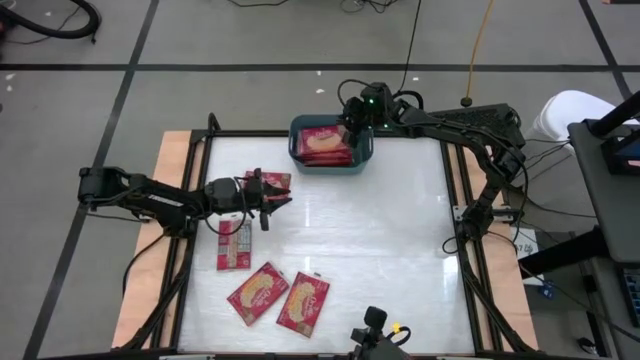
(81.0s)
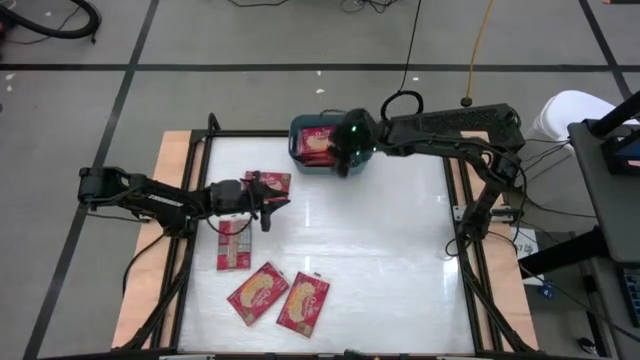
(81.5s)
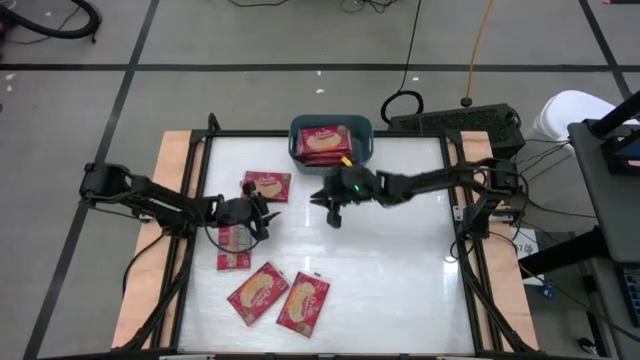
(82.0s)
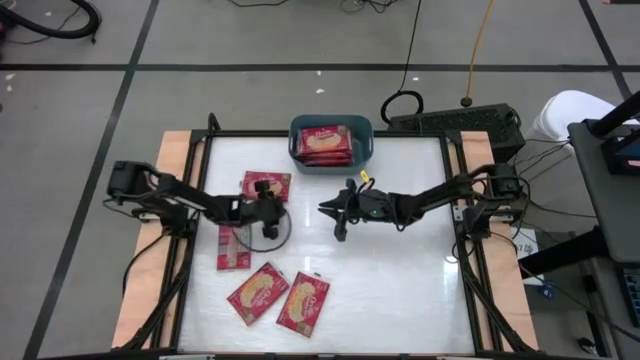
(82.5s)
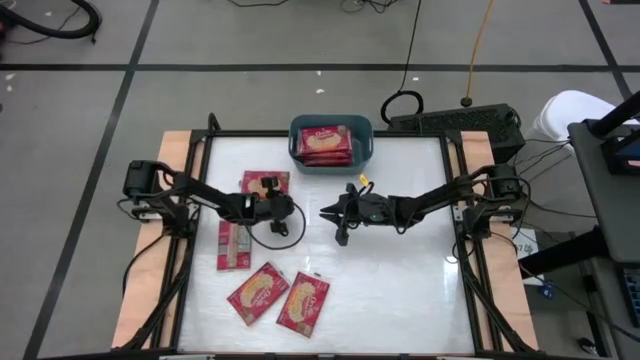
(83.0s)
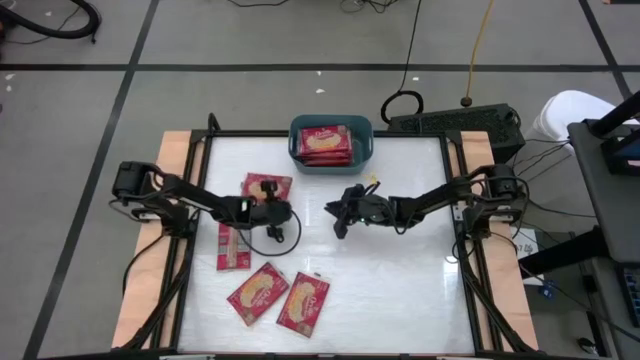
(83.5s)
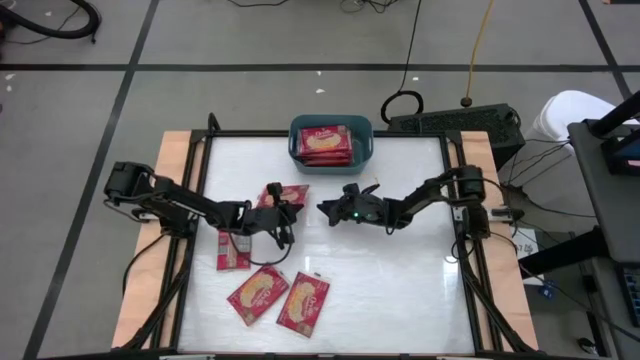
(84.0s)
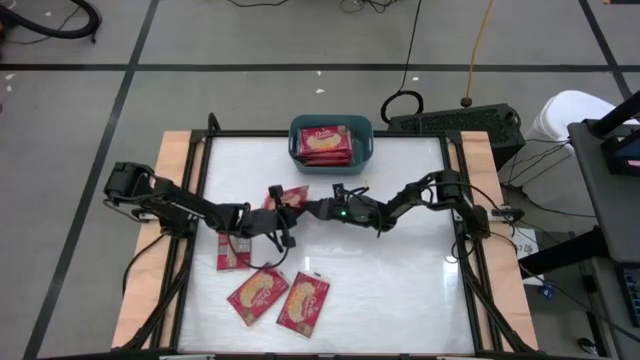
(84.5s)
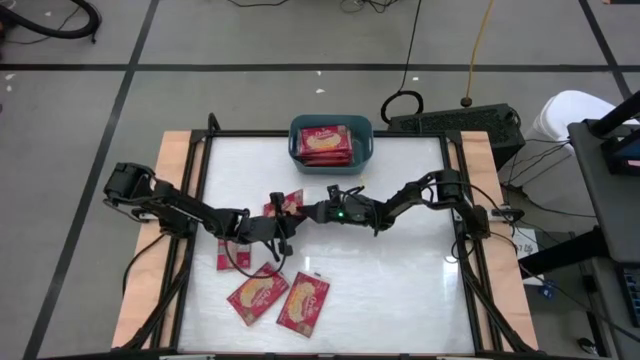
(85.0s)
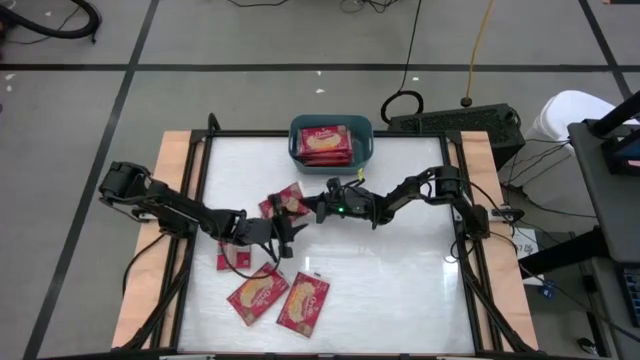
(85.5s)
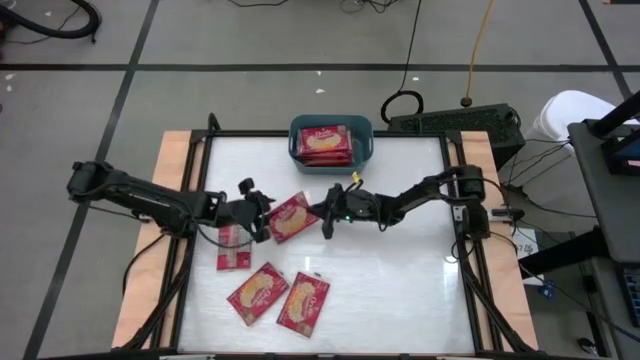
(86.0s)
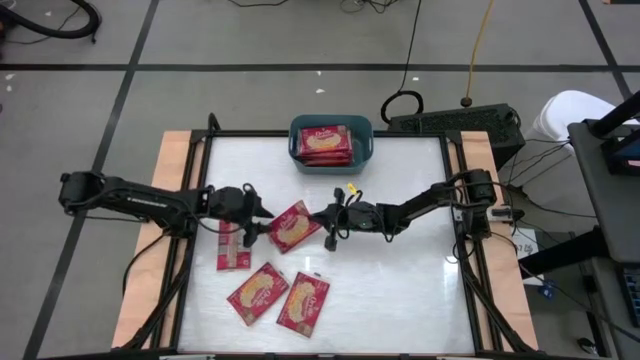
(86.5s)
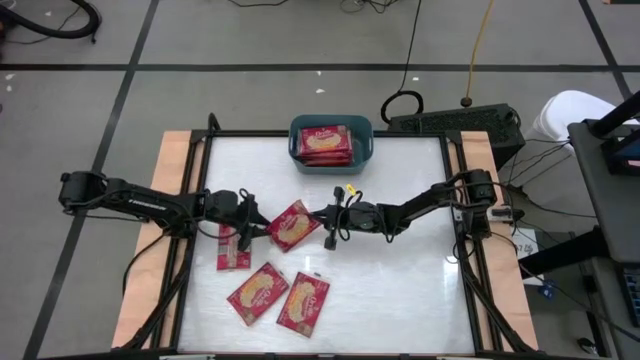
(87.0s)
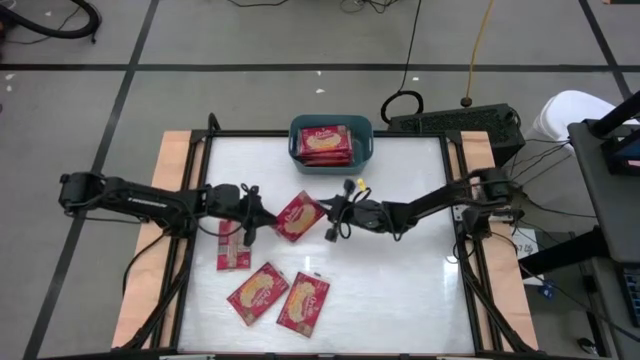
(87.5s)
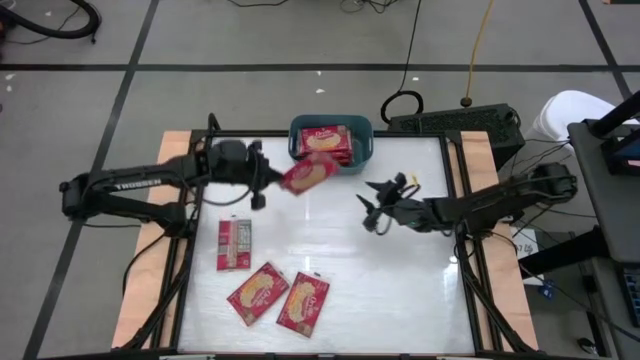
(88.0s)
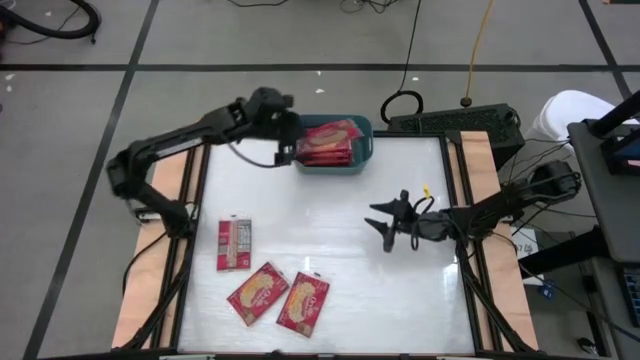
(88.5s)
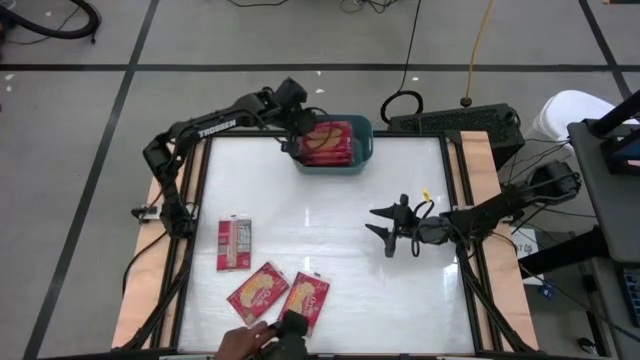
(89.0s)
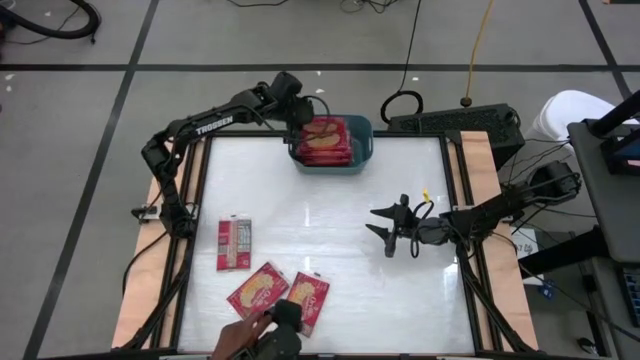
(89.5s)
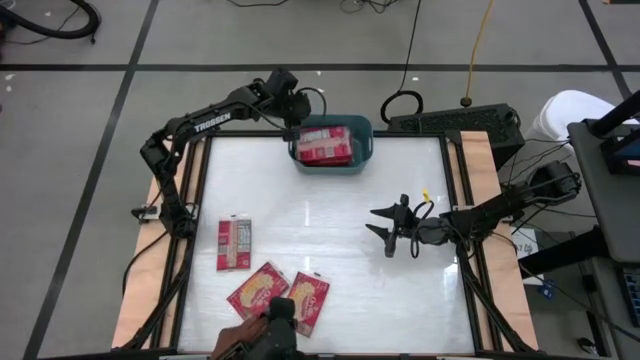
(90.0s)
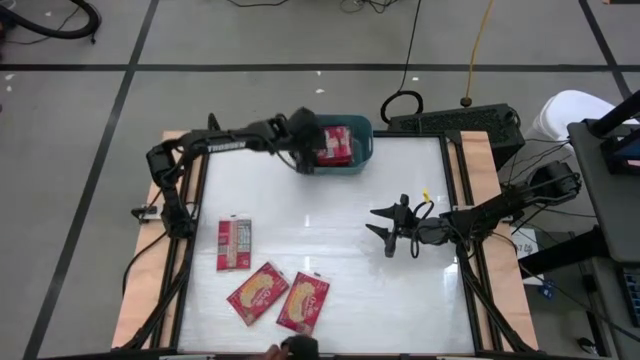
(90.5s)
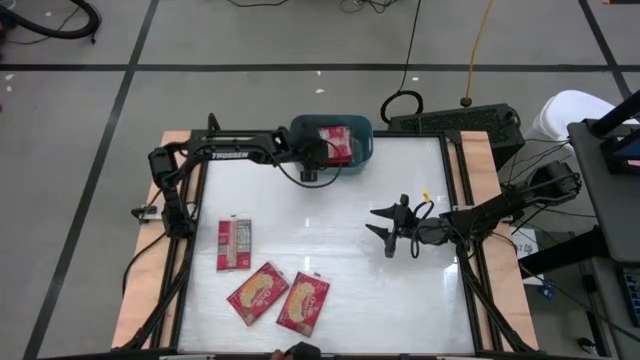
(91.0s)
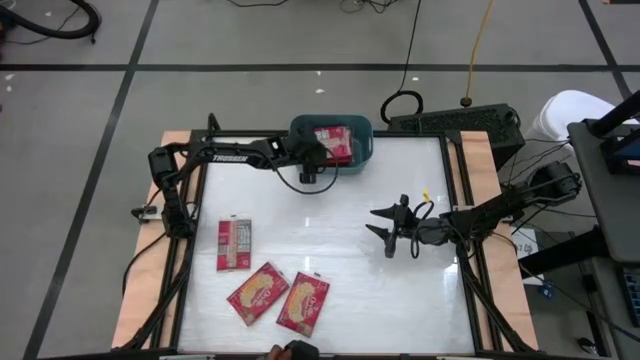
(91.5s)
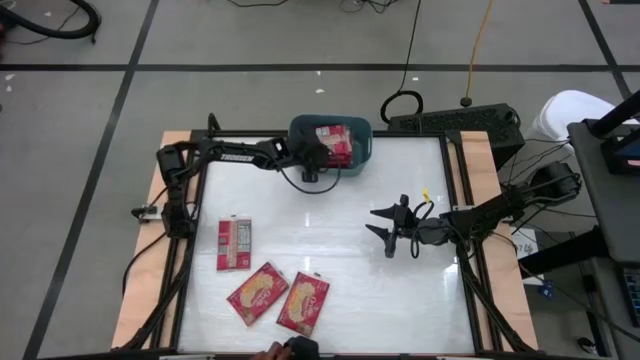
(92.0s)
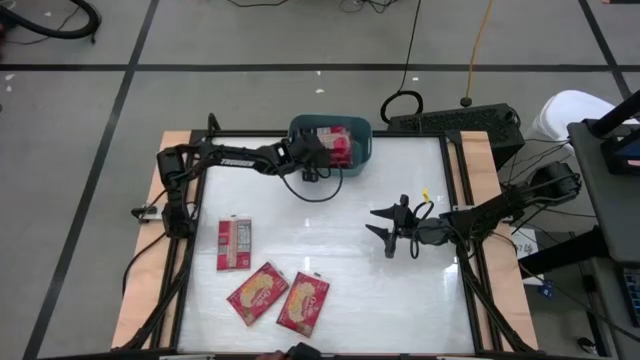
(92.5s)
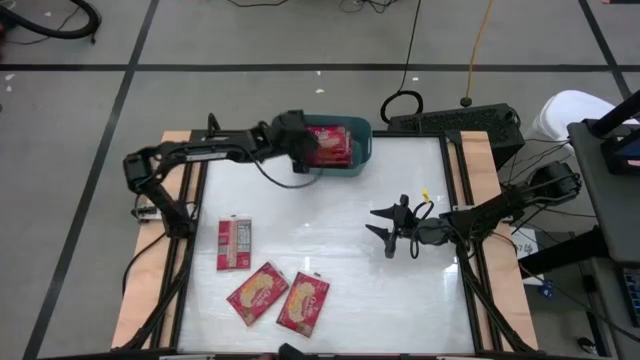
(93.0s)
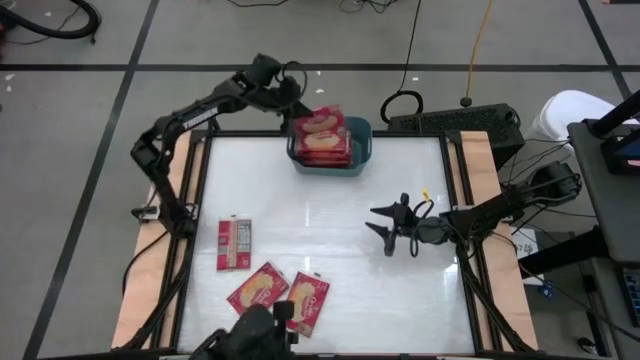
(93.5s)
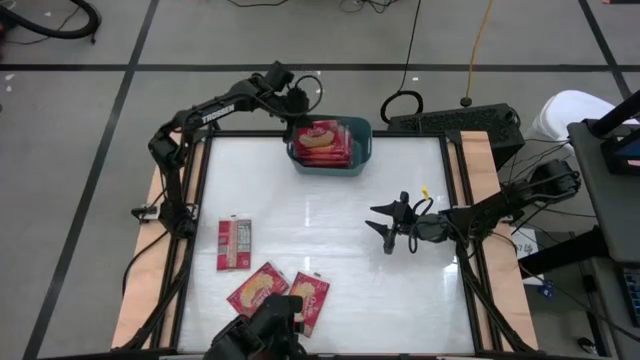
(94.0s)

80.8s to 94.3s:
Task: Sort popcorn bags into baskets
Put the red popcorn bag into the green bin

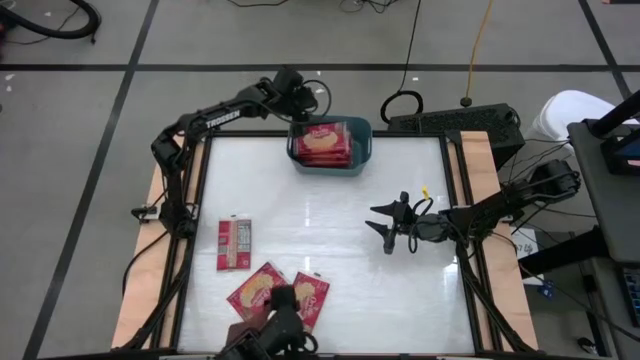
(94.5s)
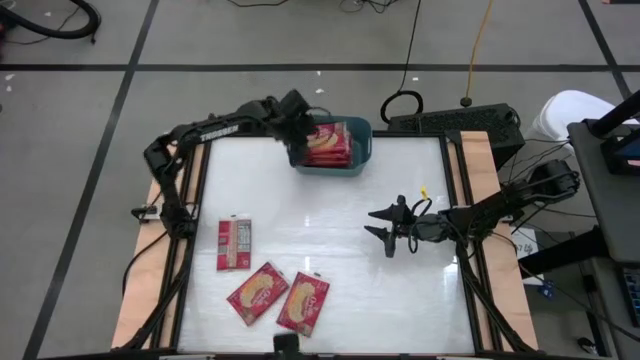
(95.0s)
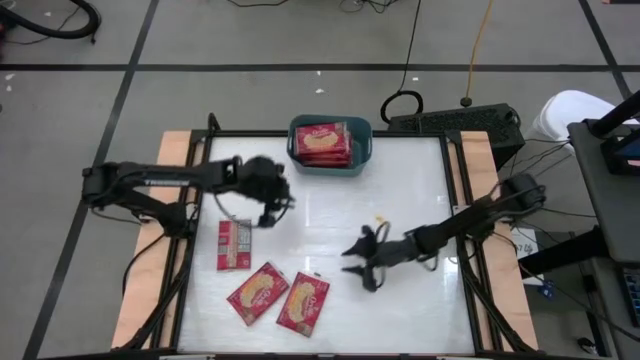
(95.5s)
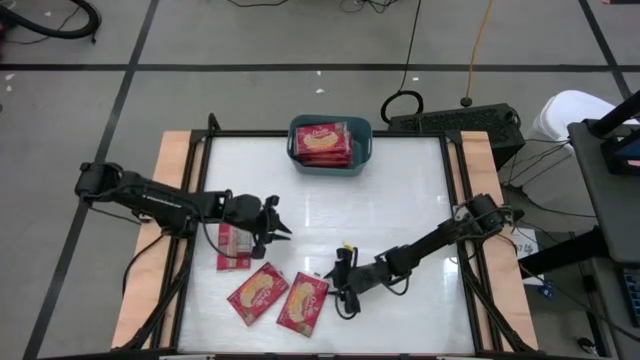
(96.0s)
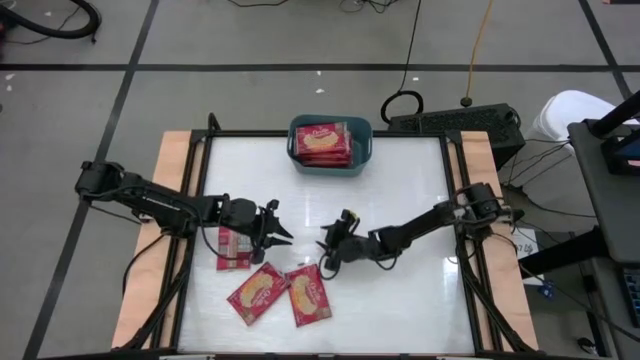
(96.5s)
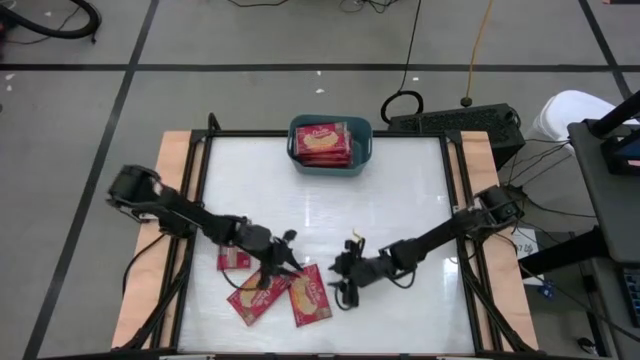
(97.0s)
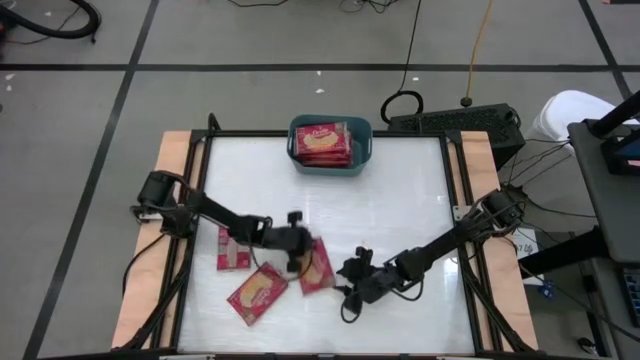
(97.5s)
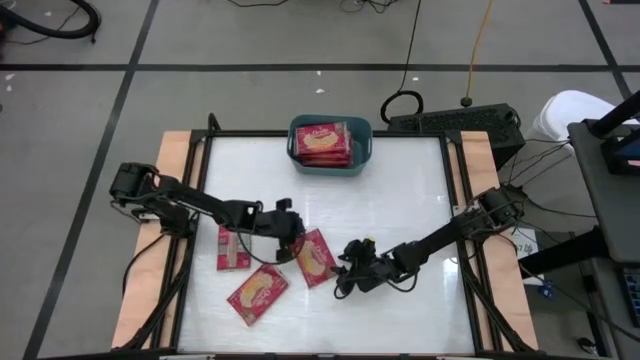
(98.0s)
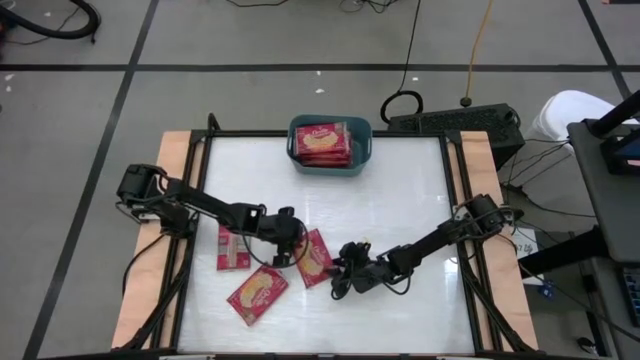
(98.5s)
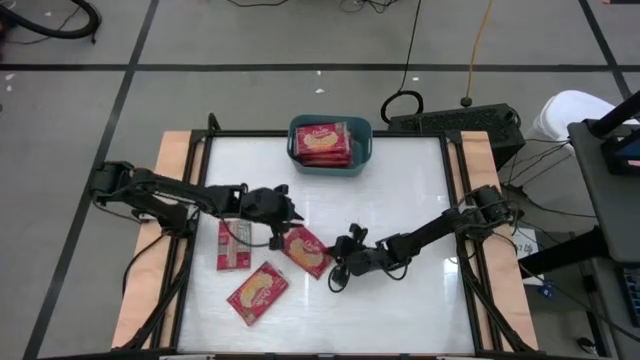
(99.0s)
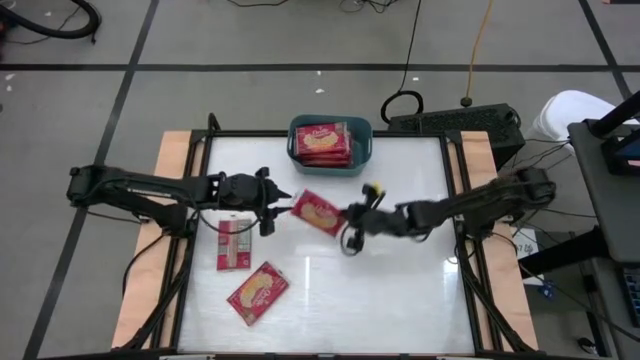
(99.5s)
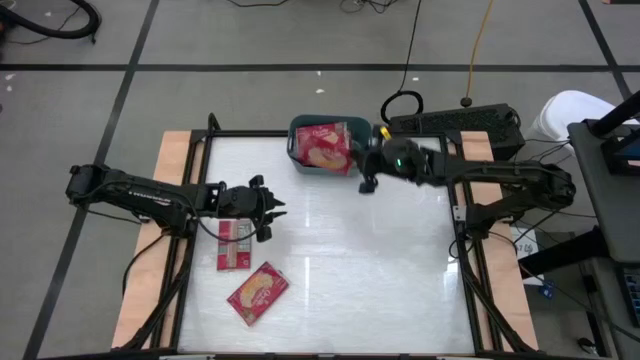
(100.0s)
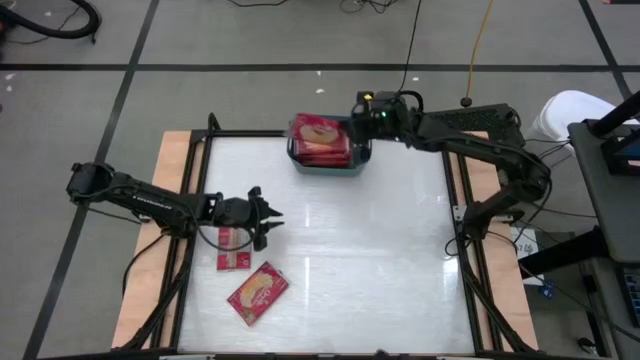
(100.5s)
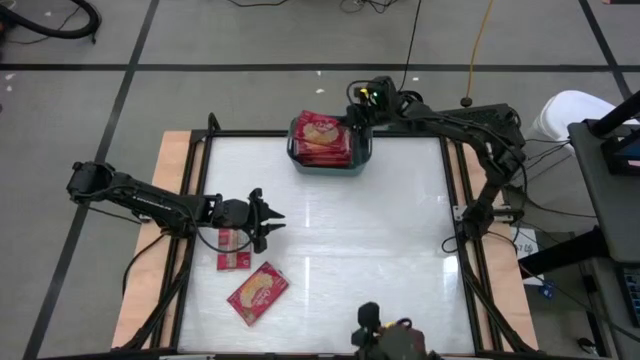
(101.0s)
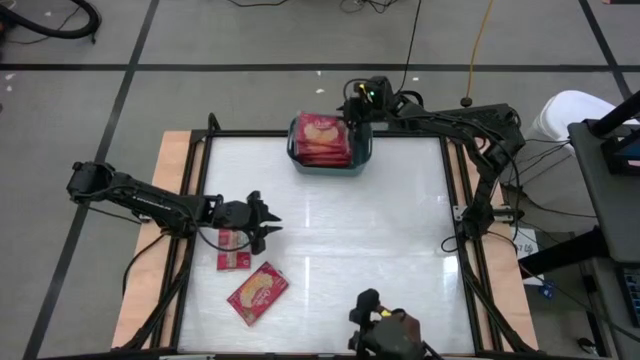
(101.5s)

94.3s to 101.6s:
Put the red popcorn bag into the green bin

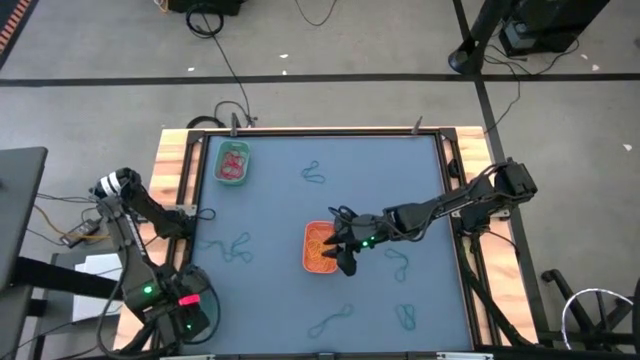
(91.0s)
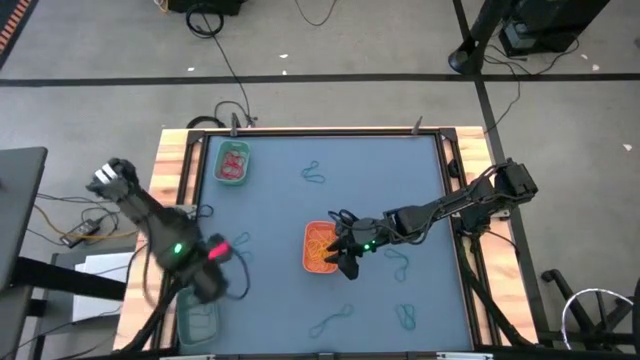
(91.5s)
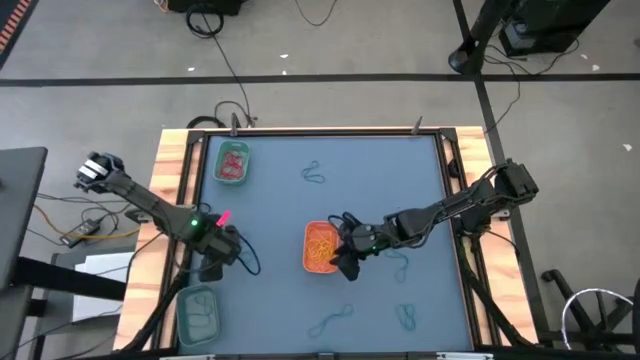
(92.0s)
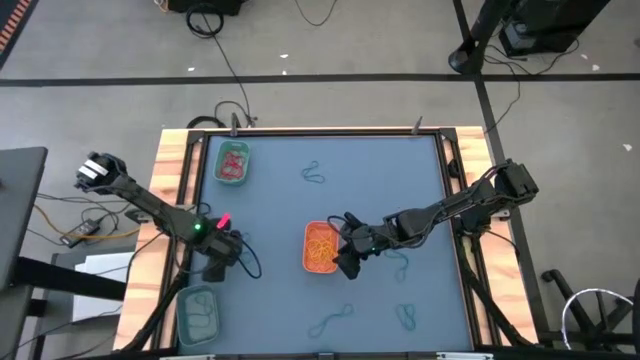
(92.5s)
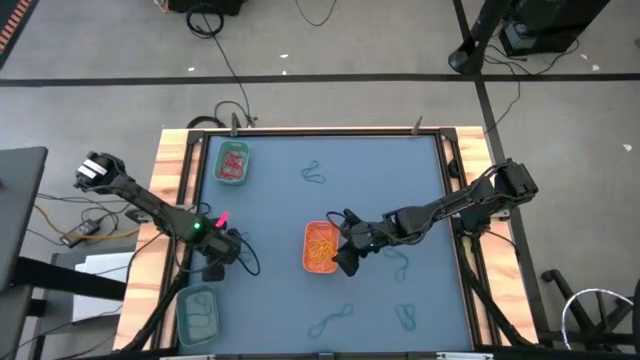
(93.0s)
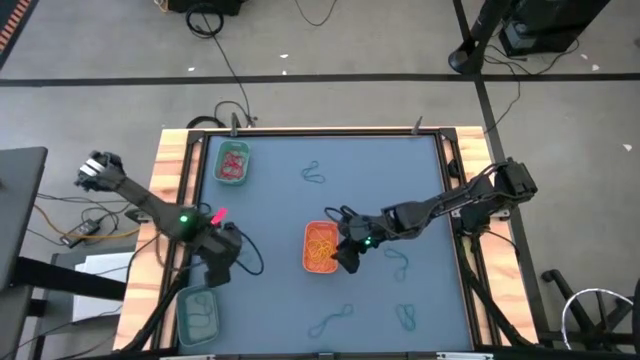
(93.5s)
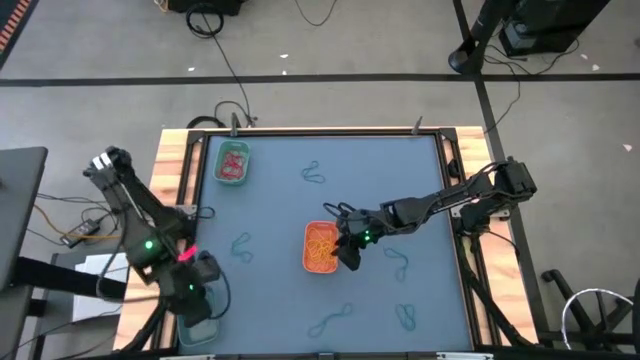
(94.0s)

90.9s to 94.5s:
Task: Sort rubber bands into baskets
Put the blue rubber band into the blue bin
